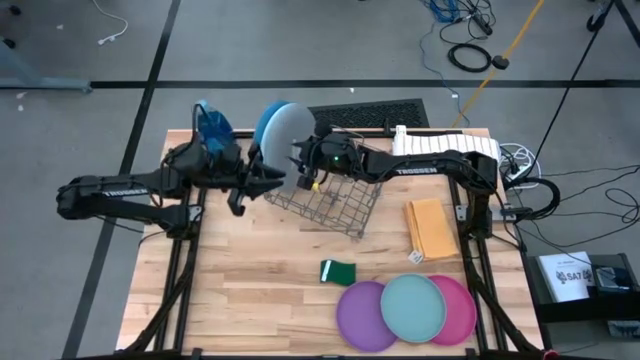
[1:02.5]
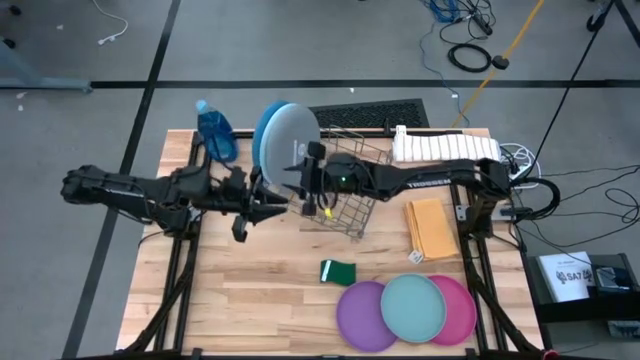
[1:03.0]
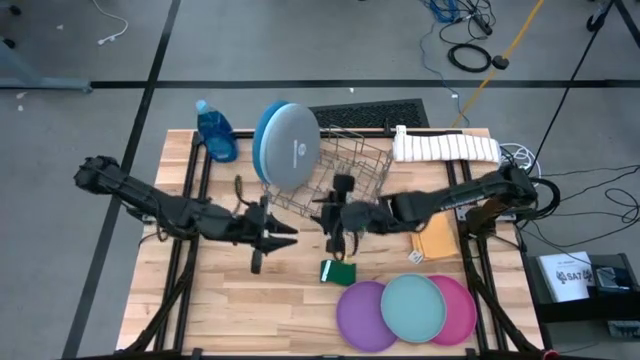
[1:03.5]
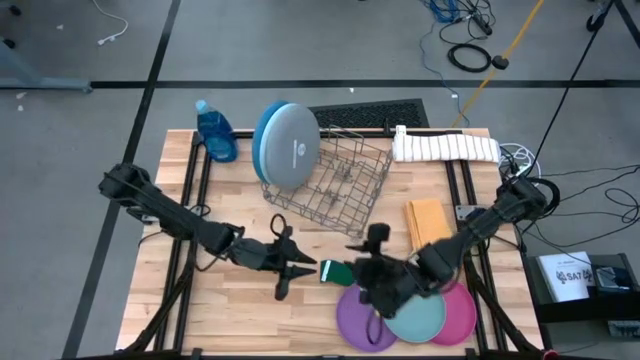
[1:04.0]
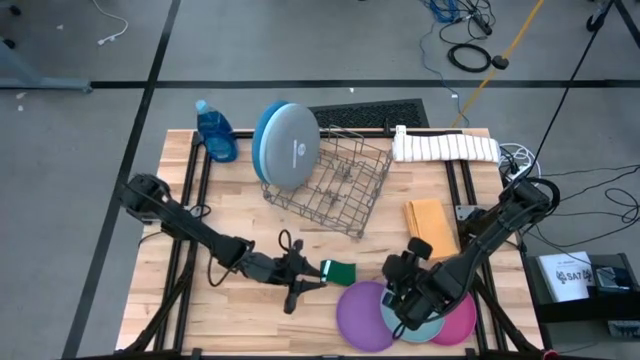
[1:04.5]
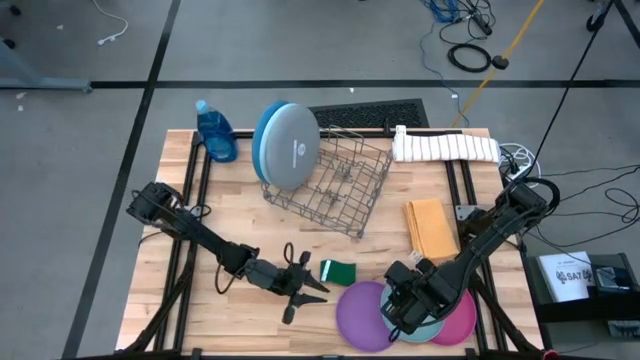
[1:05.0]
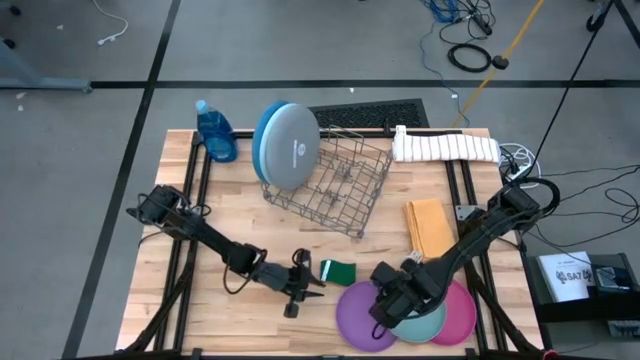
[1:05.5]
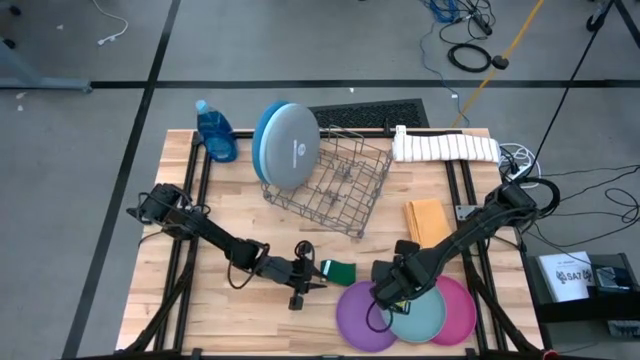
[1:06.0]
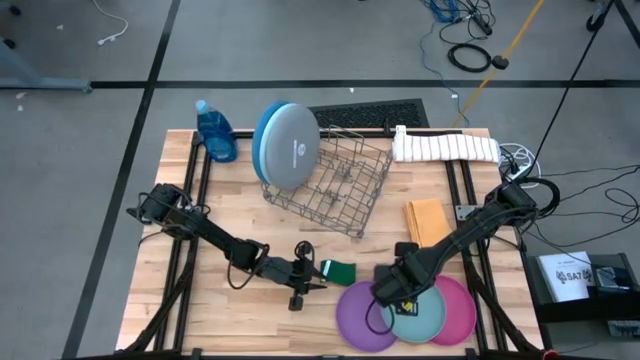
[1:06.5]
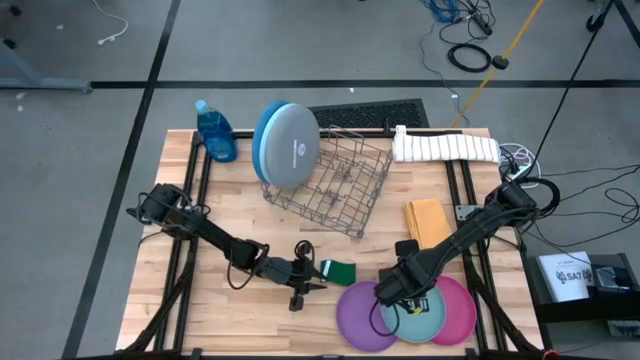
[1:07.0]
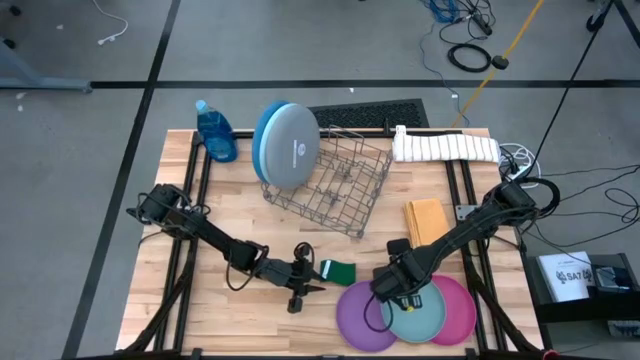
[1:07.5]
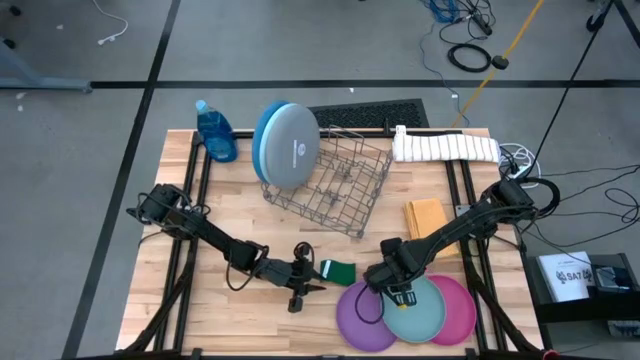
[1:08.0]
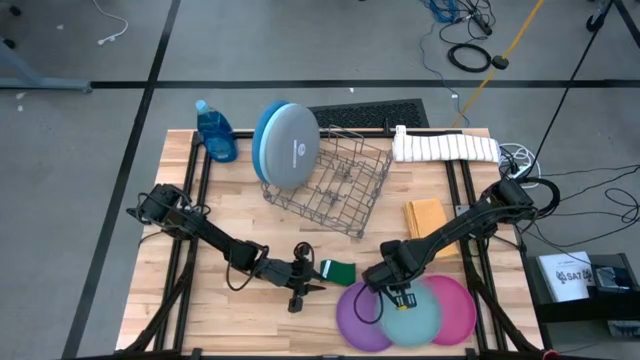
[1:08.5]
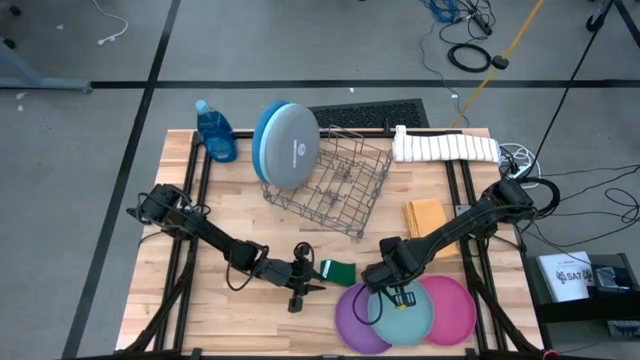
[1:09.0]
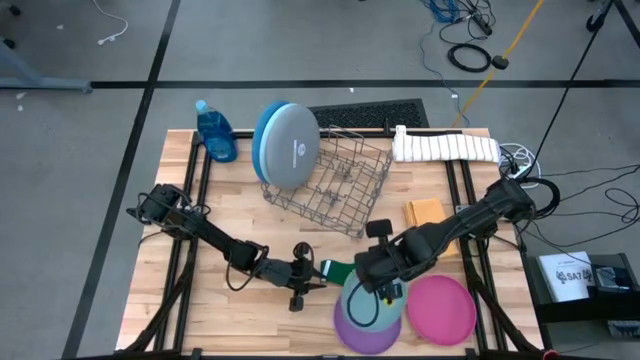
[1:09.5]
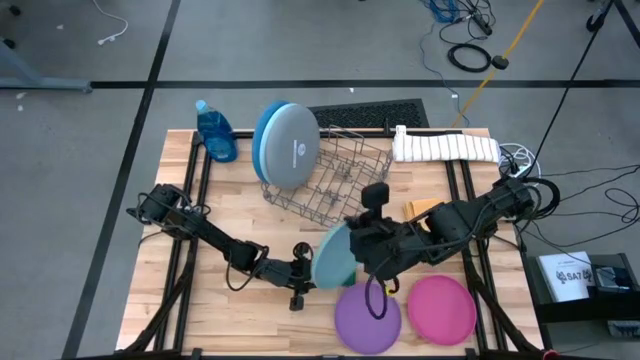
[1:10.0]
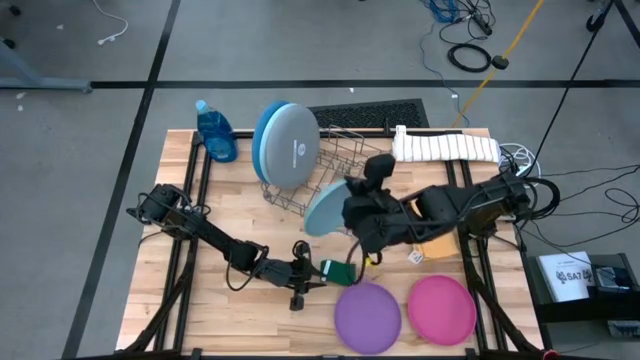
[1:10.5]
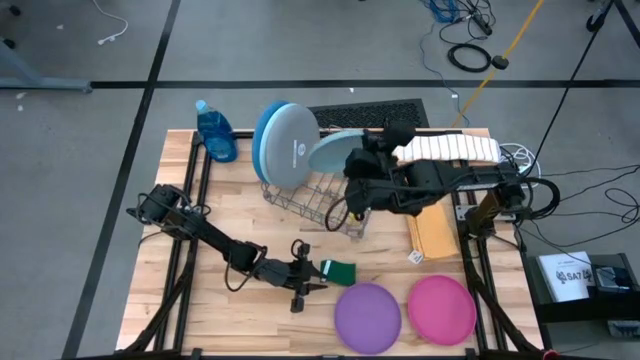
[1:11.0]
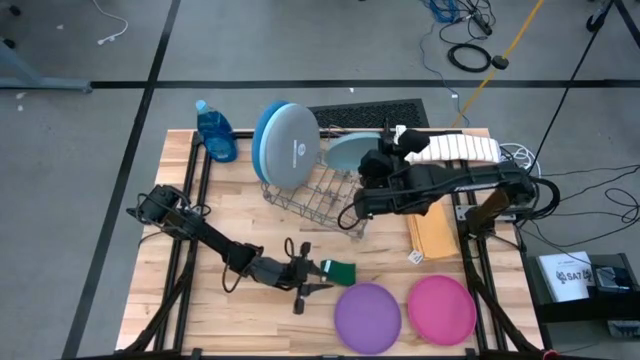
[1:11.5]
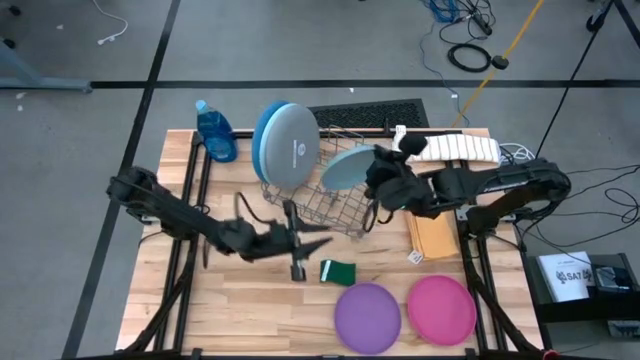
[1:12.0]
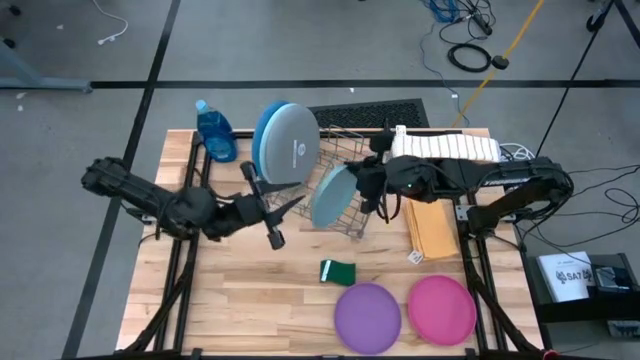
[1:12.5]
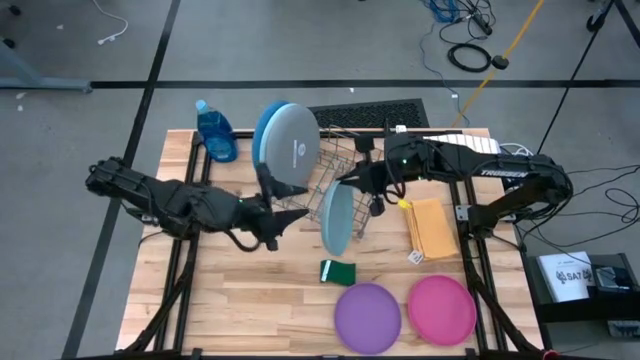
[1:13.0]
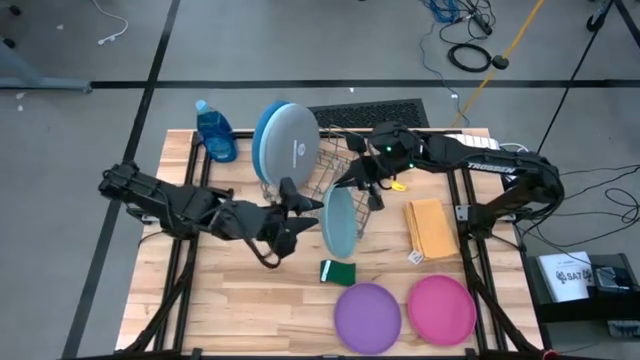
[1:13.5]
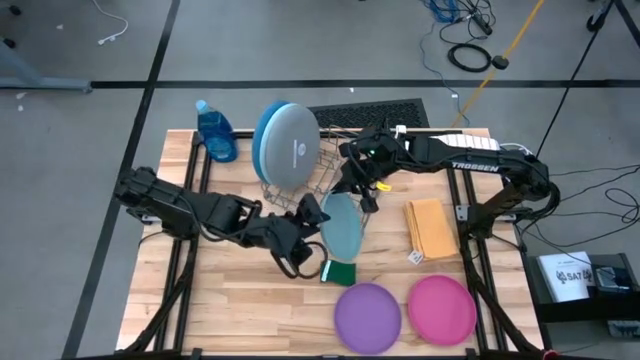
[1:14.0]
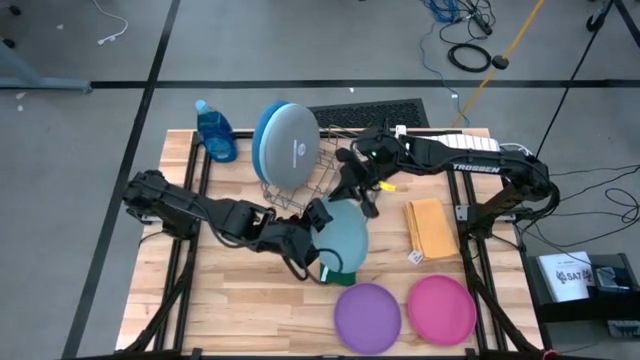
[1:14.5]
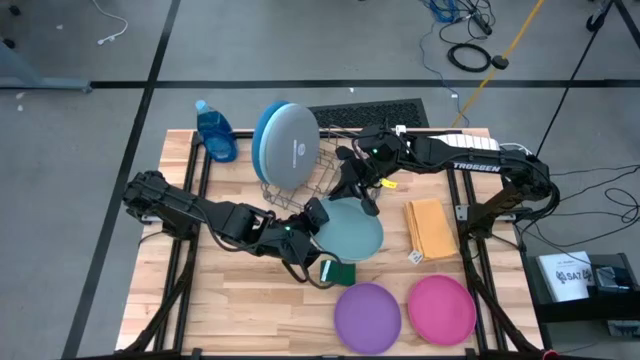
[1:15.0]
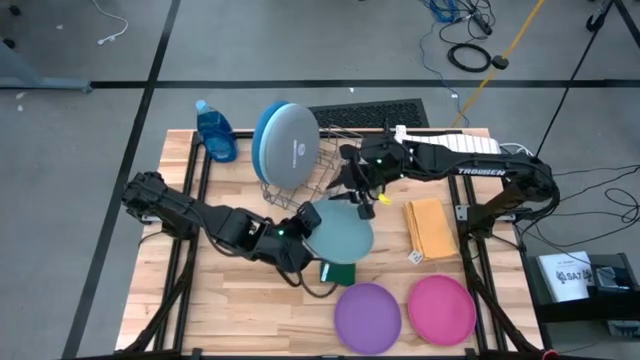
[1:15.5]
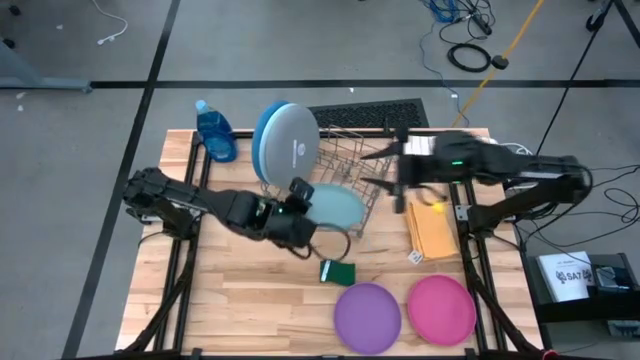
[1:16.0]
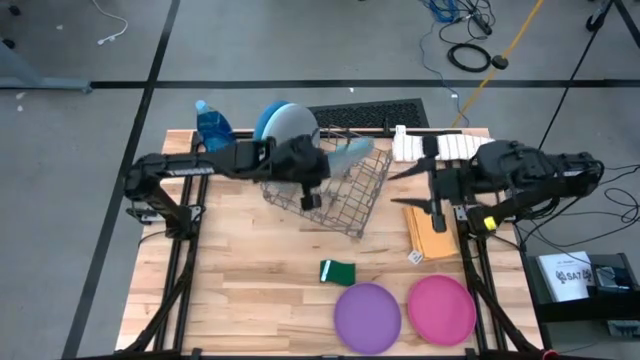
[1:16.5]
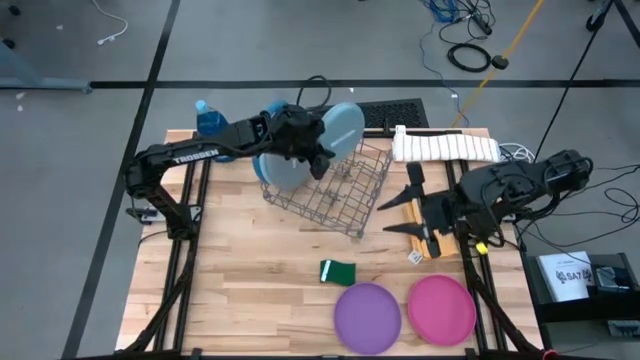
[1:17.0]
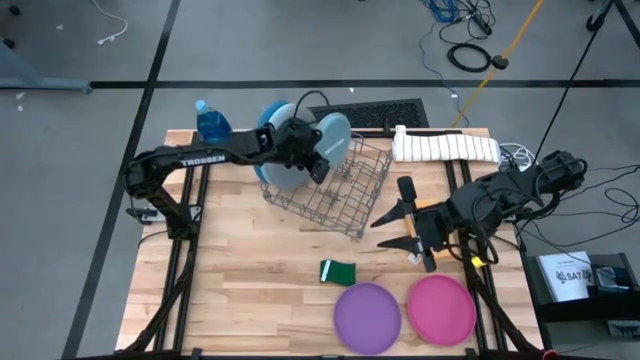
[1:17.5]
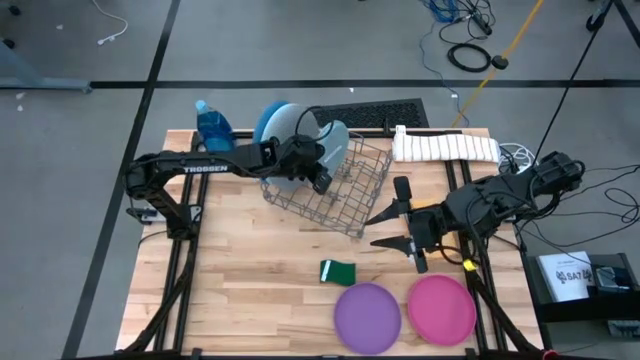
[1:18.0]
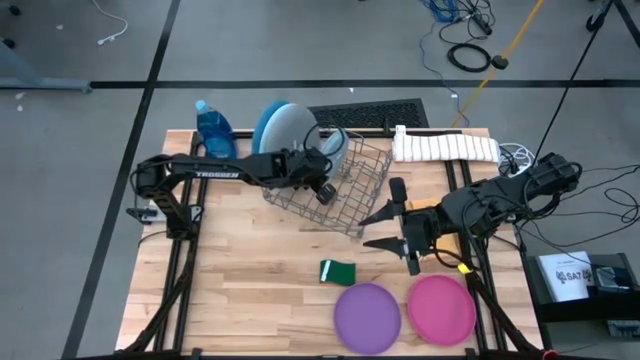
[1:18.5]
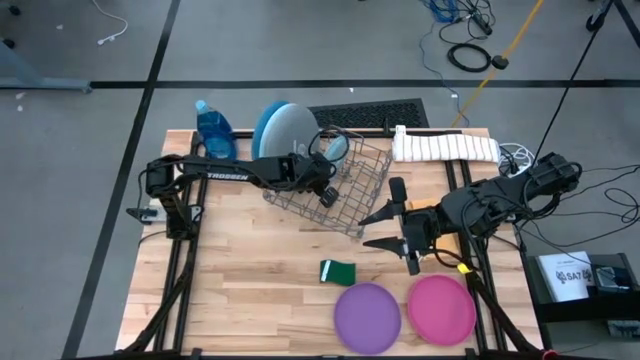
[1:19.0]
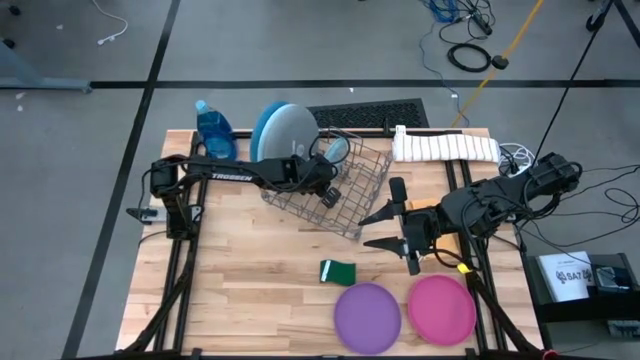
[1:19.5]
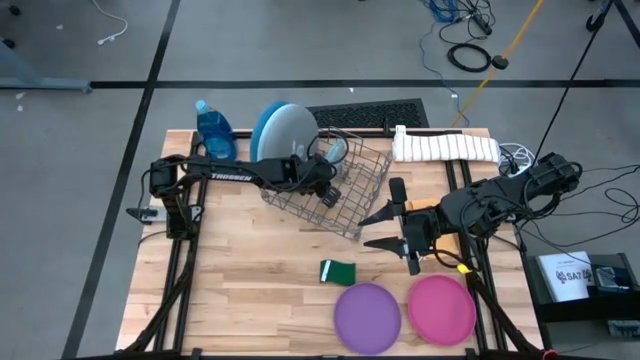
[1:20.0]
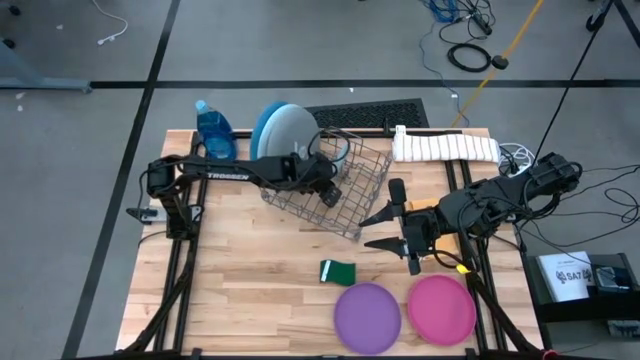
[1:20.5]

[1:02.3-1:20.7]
Task: Sort dishes
Put the small light blue plate in the dish rack

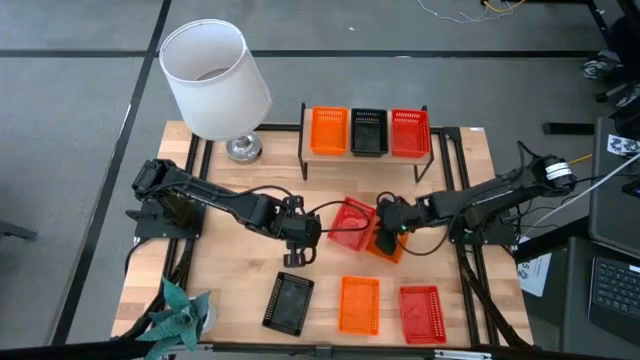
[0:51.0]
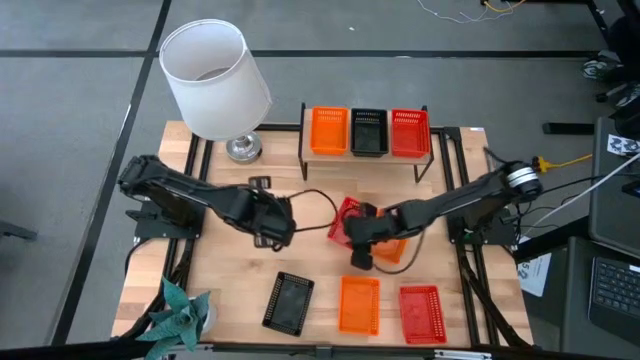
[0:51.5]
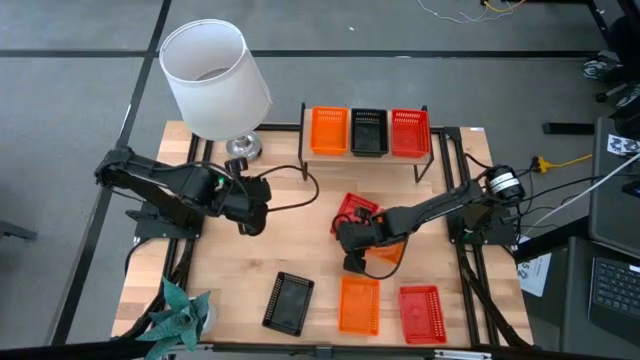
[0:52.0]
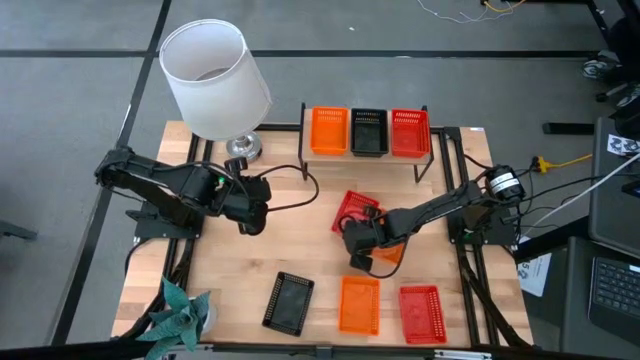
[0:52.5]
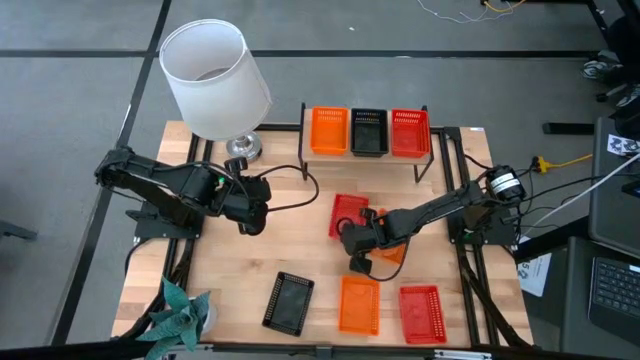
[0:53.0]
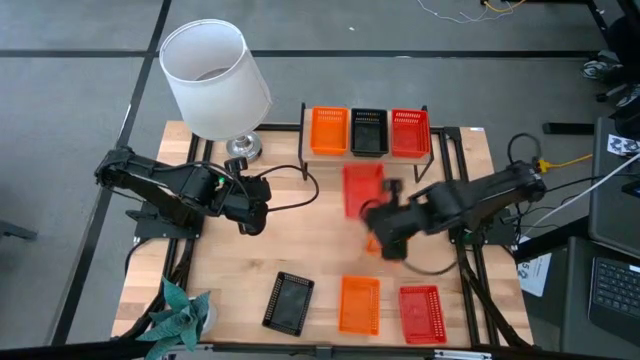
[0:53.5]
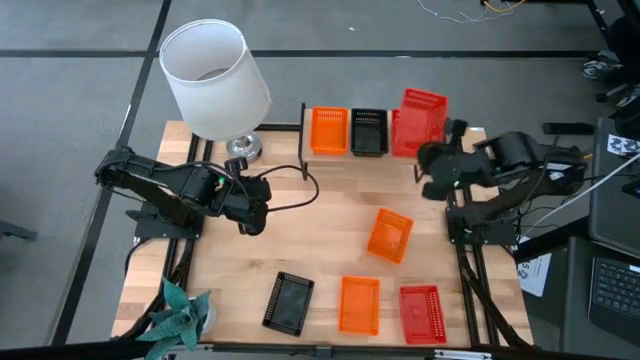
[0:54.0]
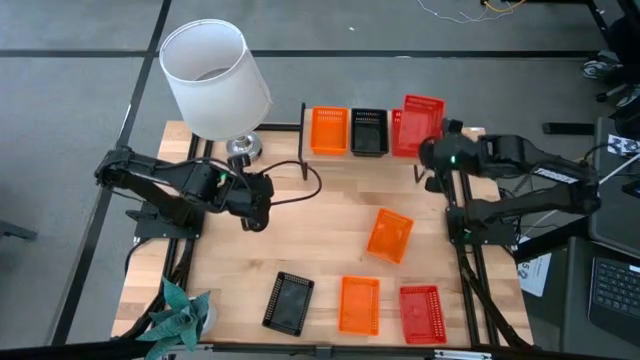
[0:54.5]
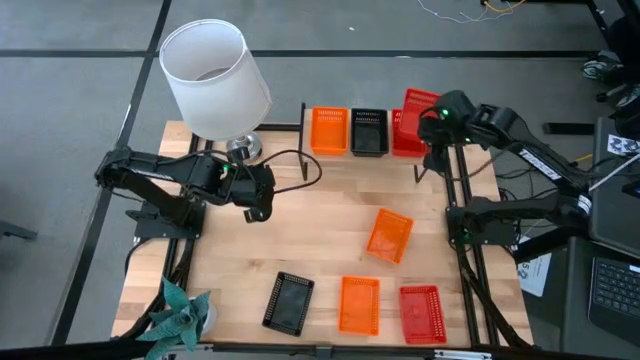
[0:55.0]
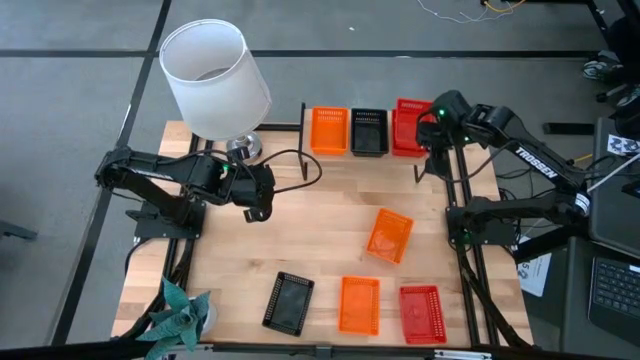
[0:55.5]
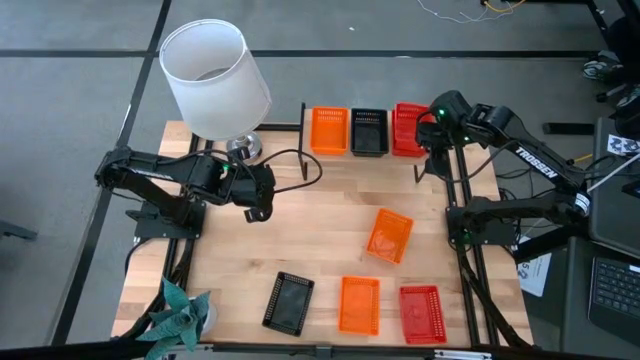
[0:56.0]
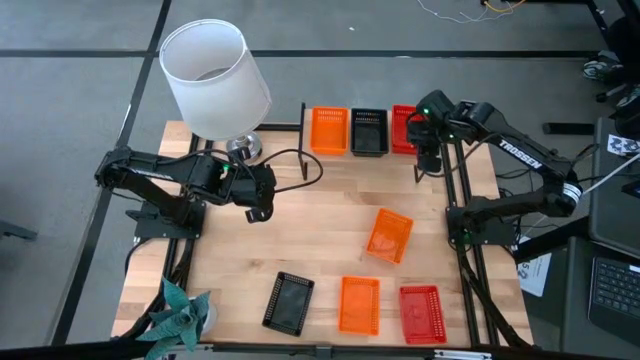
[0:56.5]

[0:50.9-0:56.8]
Task: Stack baskets on shelf by color
Stack the top red bin on the red bin on the shelf
